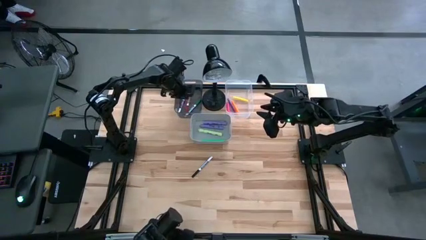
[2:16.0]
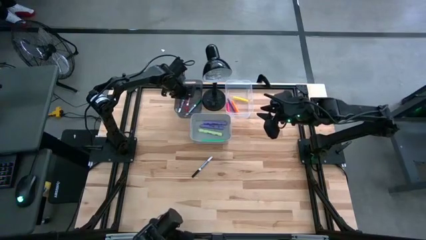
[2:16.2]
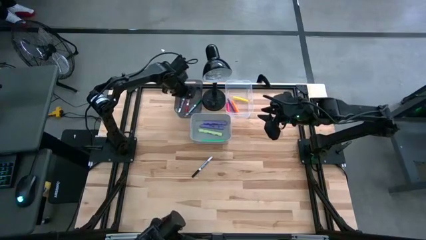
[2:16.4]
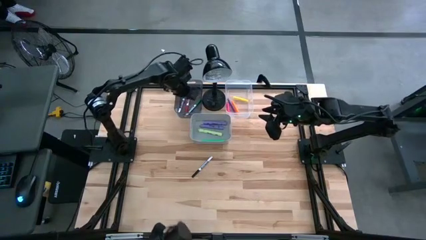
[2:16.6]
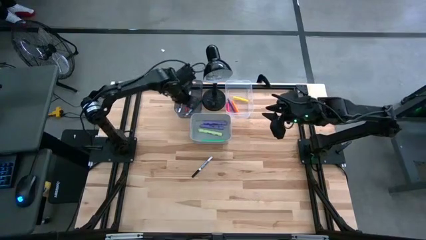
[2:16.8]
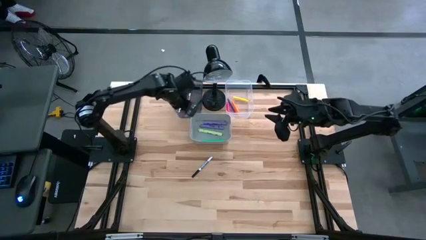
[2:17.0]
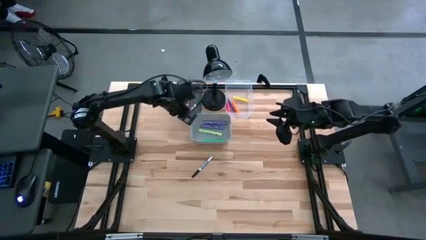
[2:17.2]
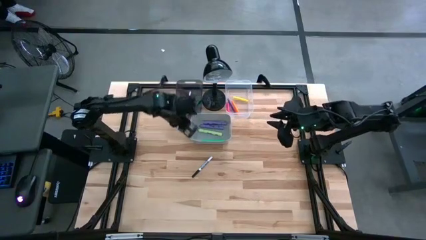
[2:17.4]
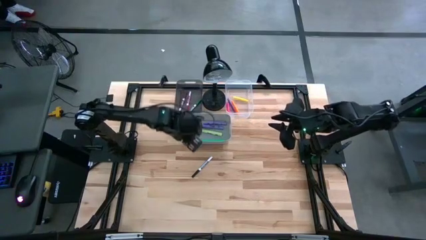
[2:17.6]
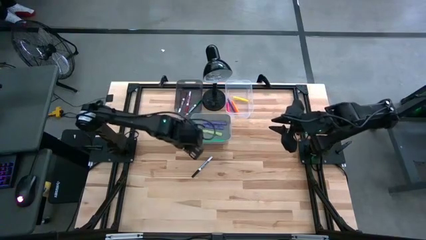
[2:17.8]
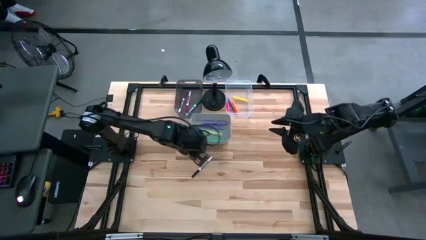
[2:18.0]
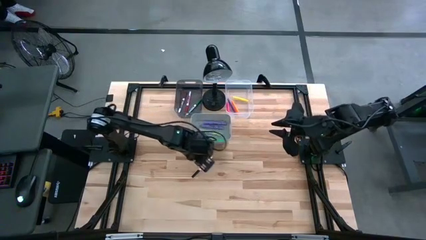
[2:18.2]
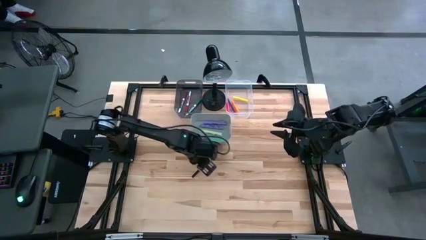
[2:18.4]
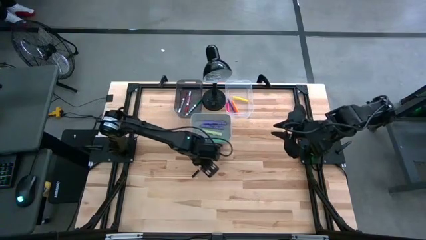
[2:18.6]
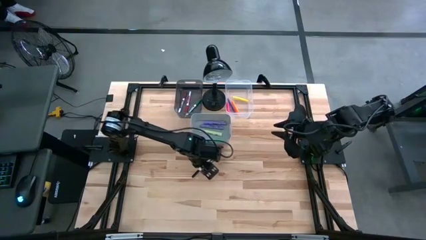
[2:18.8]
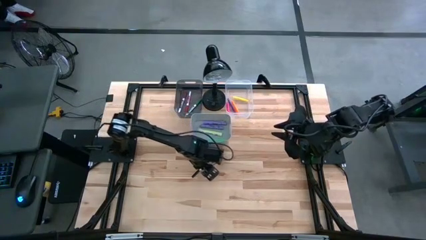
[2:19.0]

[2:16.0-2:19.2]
Task: Pick & Place Markers
Put the medium black marker into the black bin

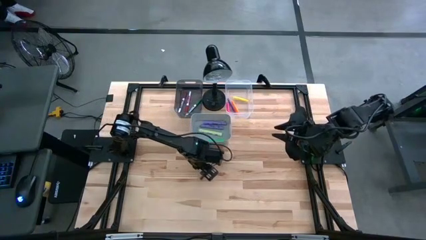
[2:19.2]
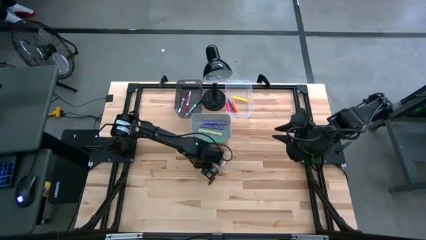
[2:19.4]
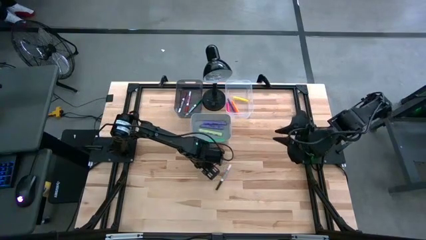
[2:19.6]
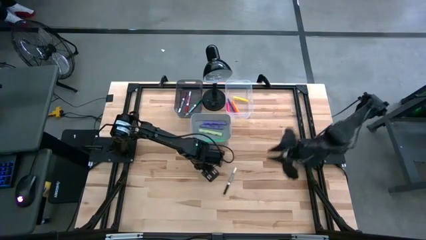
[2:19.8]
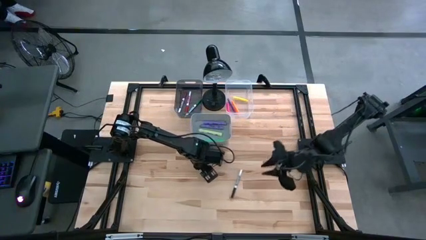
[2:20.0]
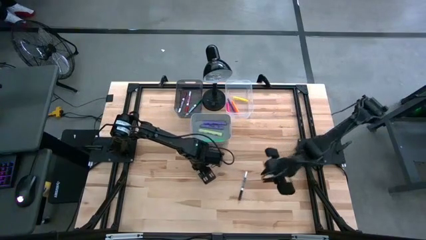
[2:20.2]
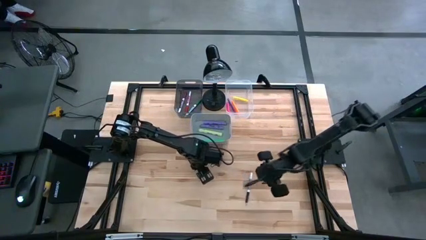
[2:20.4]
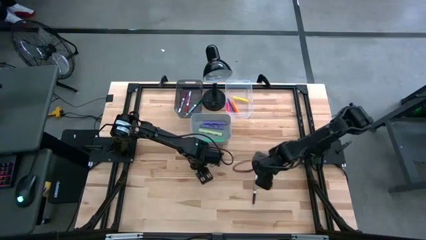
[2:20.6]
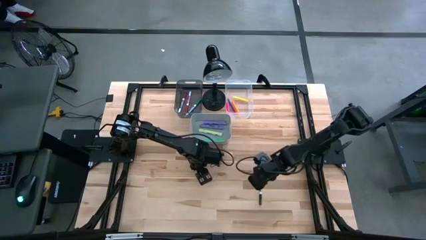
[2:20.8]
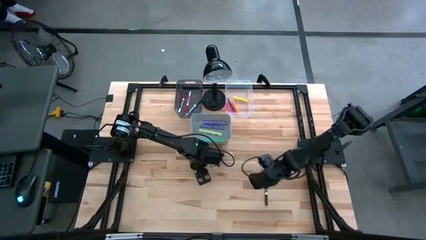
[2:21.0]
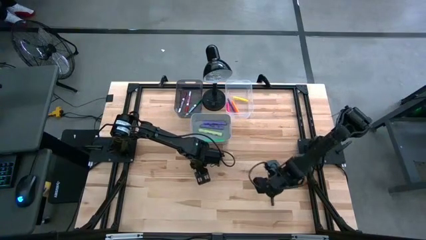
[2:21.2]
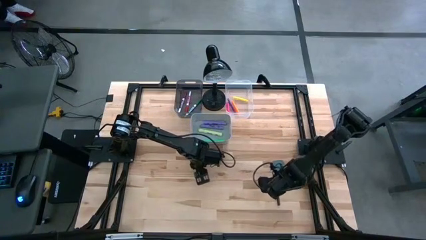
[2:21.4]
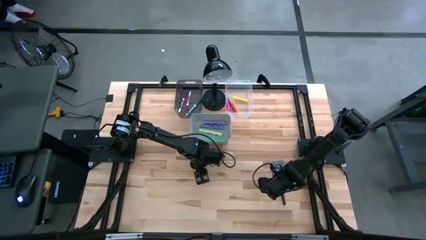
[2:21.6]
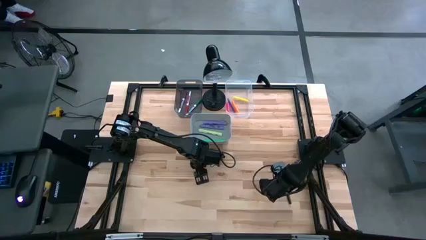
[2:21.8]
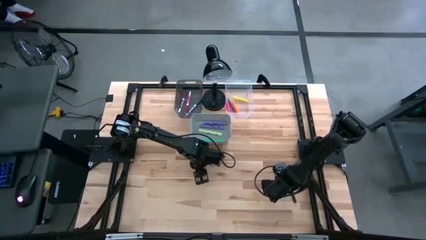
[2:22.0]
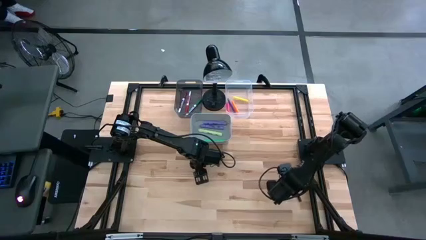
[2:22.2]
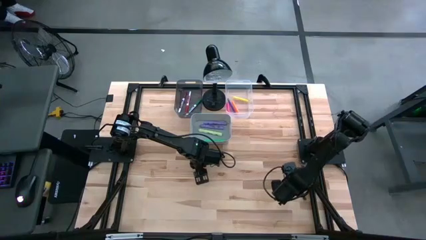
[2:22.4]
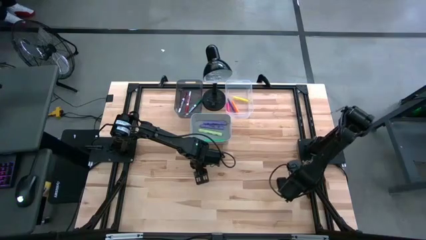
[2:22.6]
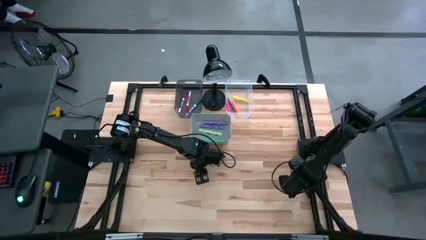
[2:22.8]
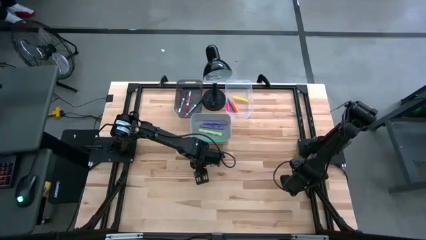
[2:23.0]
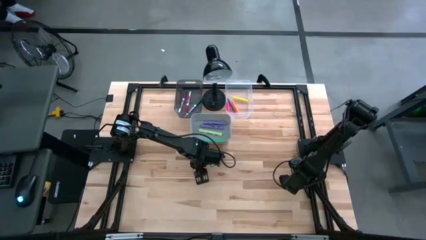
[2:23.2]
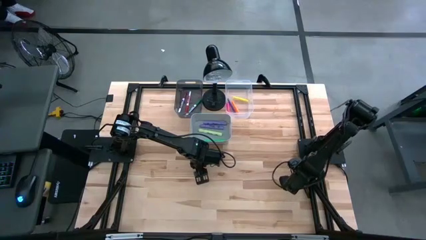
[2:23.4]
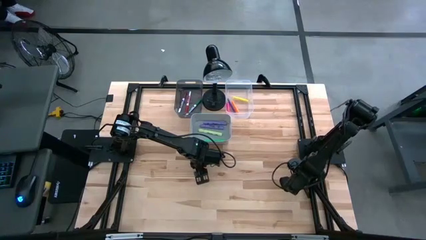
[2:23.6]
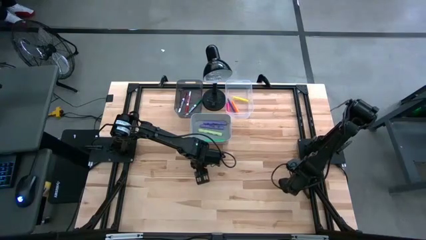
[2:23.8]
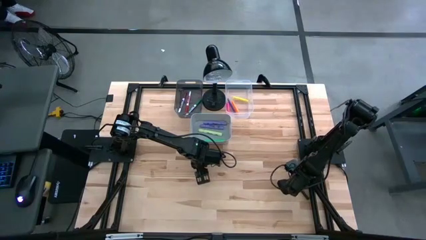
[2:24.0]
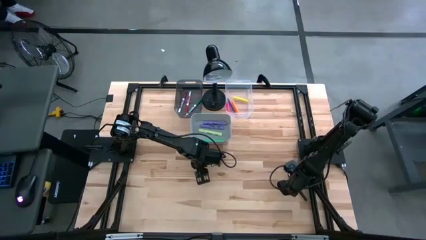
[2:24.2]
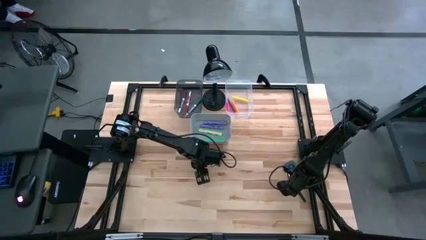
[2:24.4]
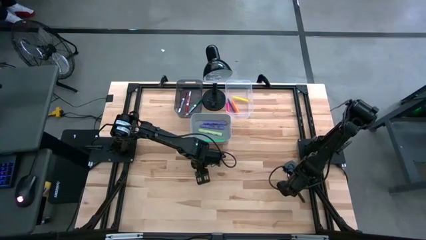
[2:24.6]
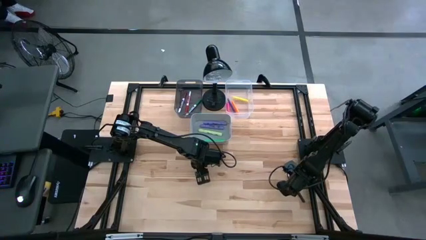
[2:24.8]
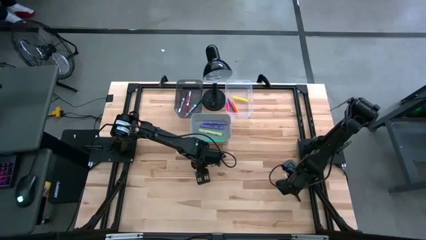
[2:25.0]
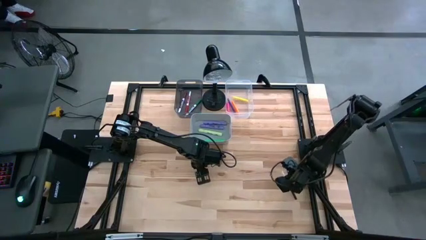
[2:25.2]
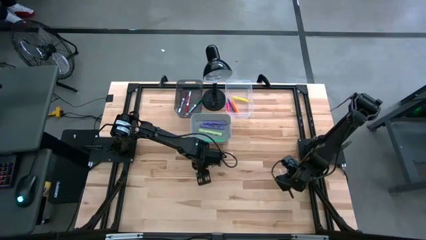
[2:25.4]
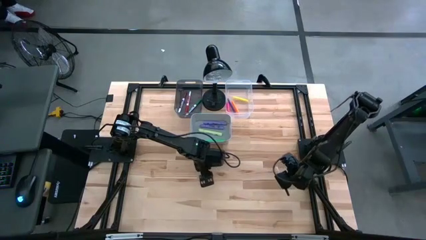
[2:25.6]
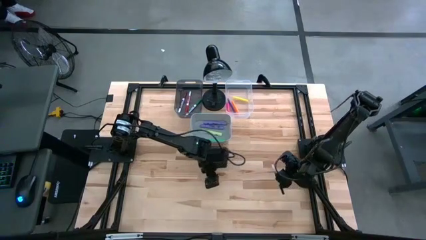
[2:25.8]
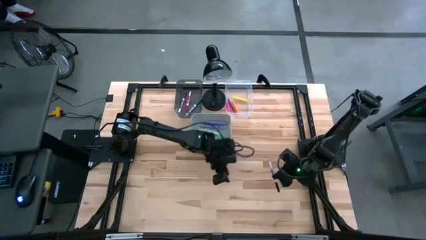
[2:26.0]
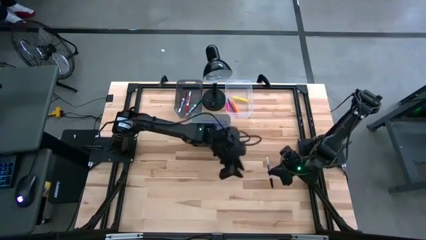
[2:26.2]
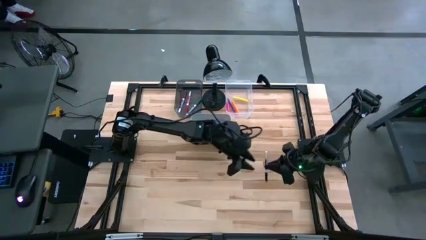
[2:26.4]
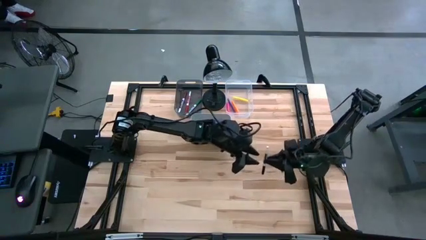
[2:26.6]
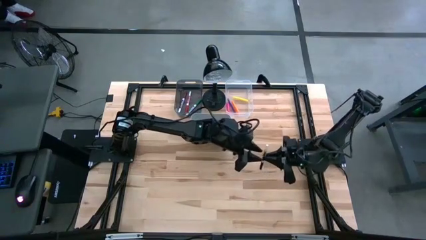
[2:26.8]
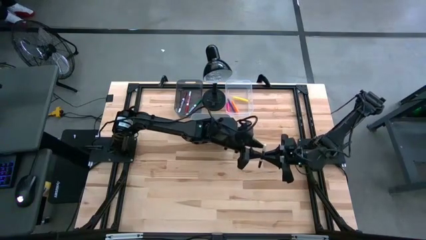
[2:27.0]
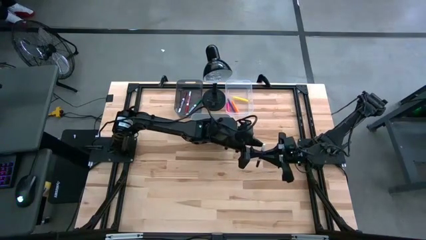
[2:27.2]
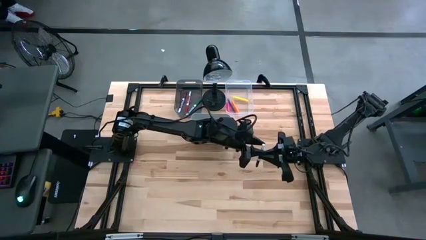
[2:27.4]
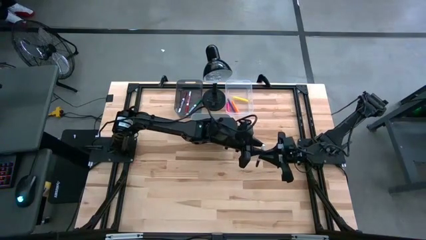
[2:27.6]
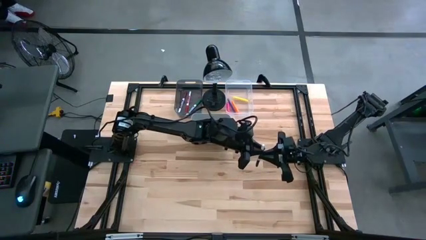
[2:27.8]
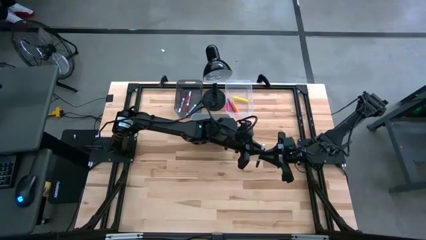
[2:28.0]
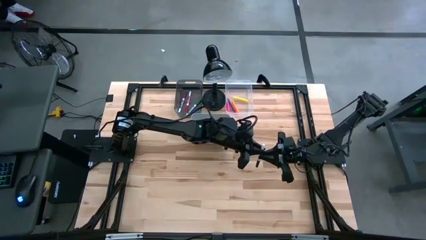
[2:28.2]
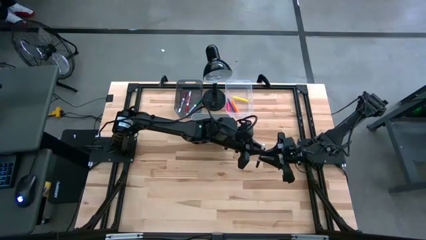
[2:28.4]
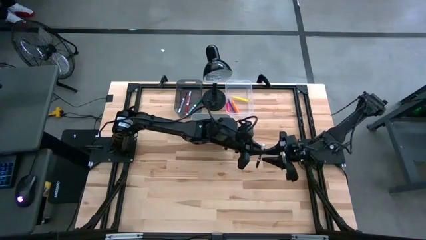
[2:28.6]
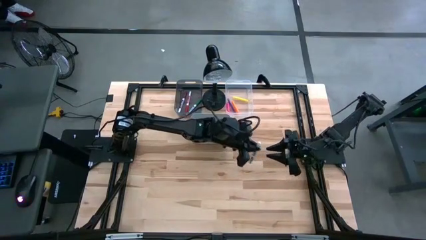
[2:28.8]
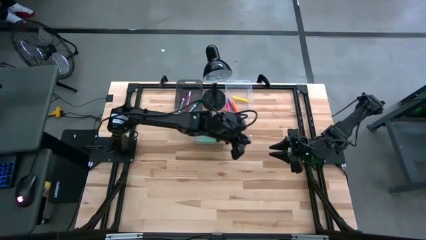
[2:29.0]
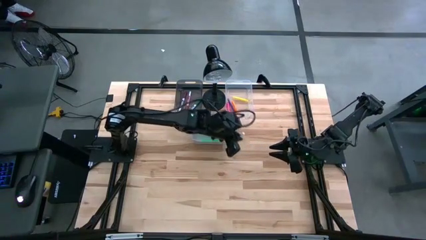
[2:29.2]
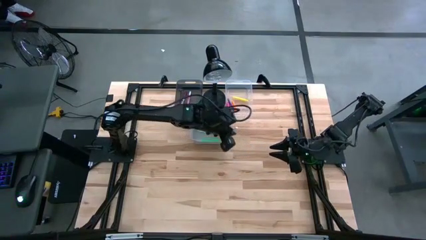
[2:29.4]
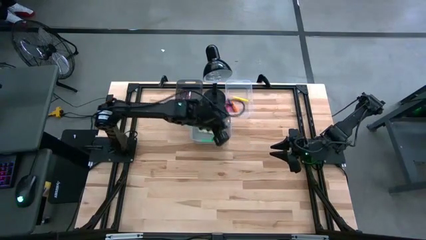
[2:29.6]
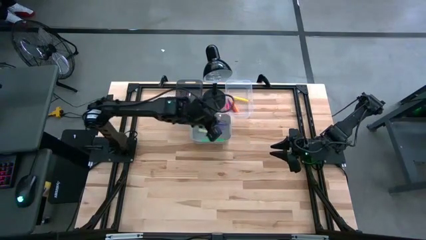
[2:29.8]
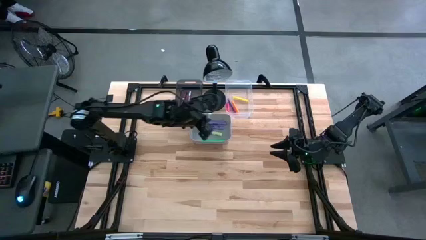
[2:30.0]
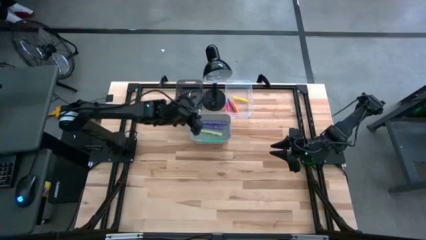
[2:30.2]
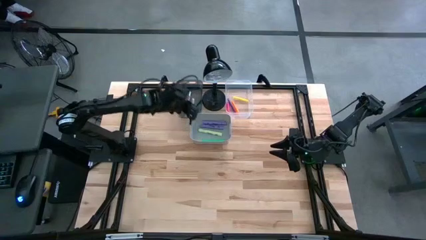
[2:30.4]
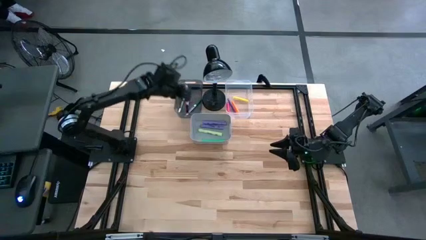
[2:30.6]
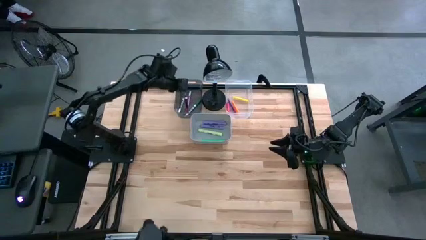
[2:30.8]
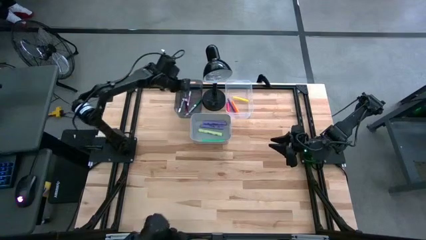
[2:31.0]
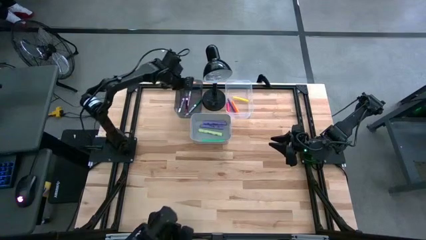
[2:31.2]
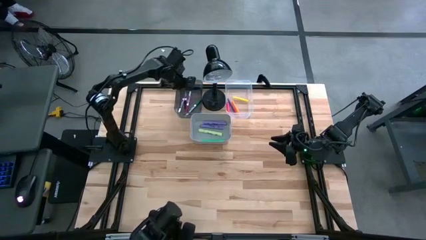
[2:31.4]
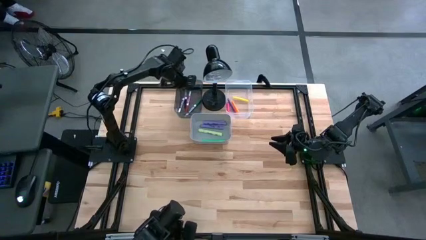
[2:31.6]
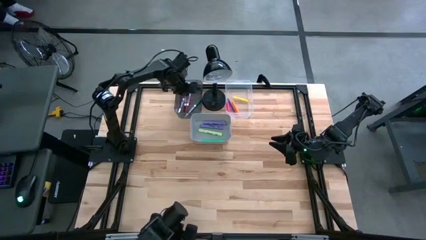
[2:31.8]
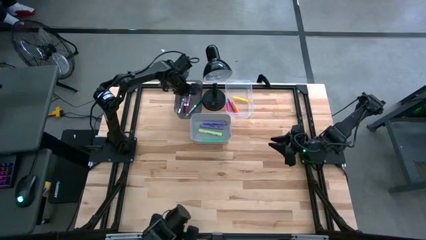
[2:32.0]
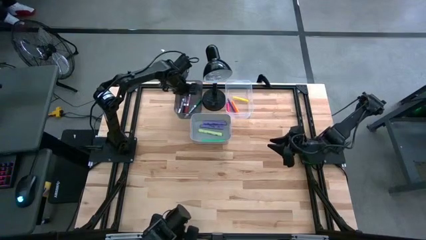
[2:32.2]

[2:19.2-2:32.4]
Put the medium black marker into the black bin
